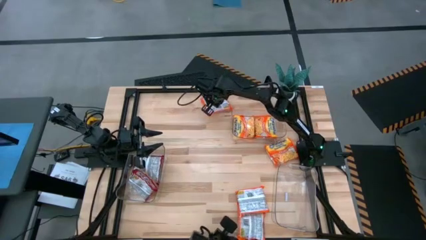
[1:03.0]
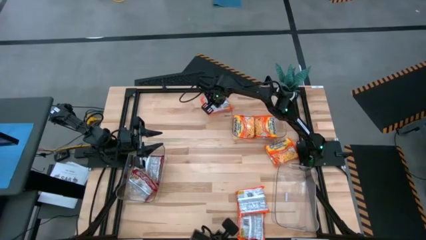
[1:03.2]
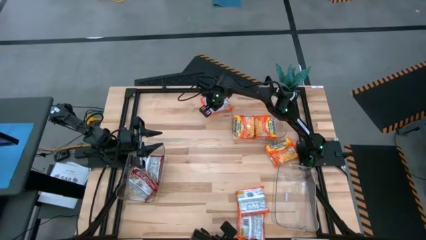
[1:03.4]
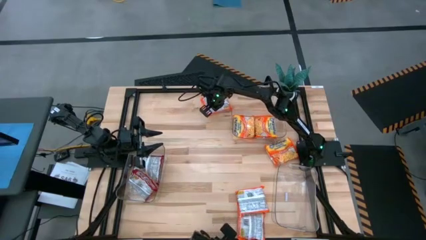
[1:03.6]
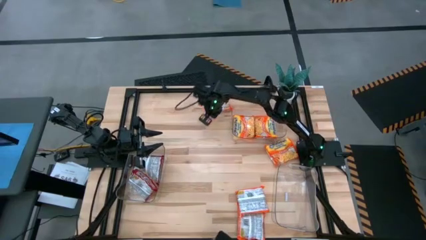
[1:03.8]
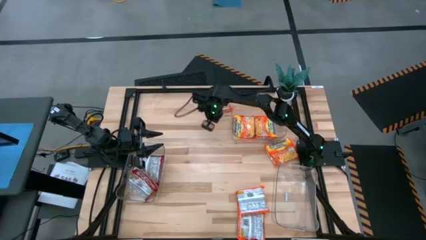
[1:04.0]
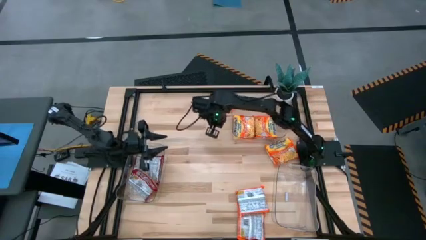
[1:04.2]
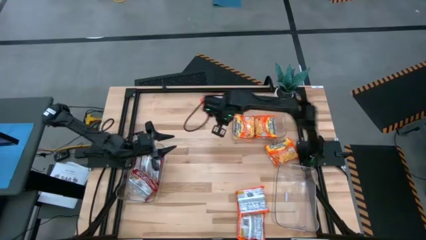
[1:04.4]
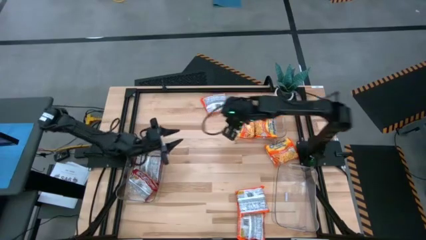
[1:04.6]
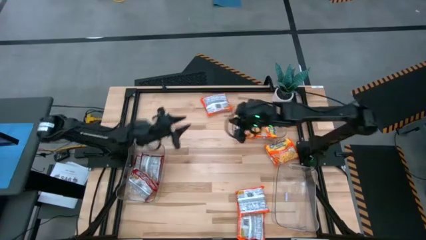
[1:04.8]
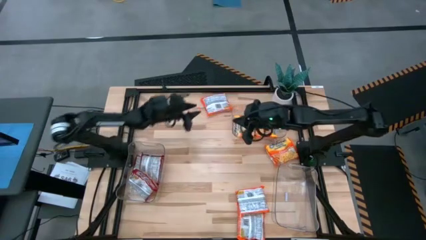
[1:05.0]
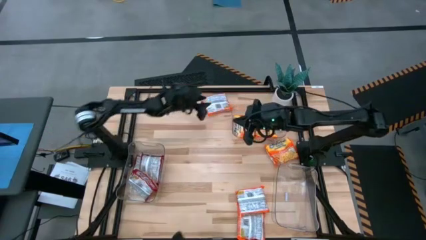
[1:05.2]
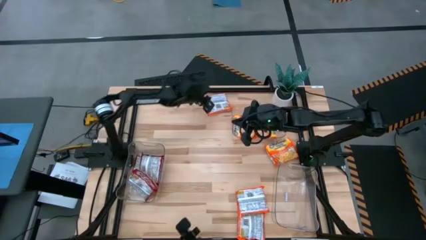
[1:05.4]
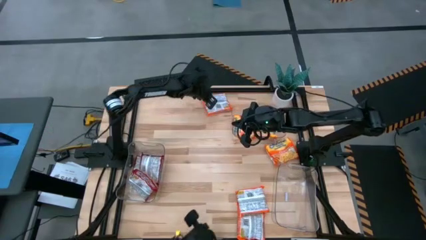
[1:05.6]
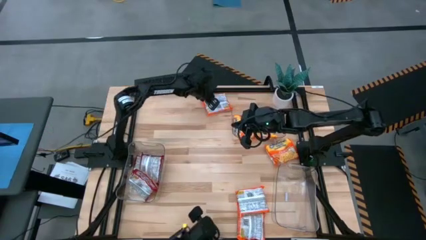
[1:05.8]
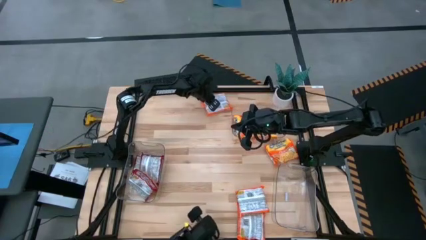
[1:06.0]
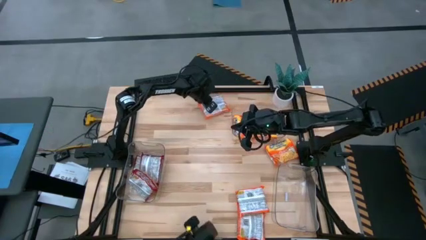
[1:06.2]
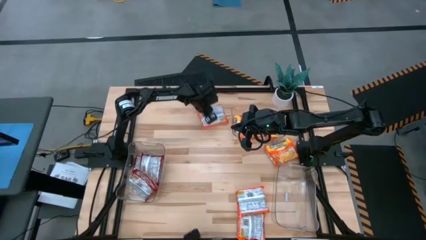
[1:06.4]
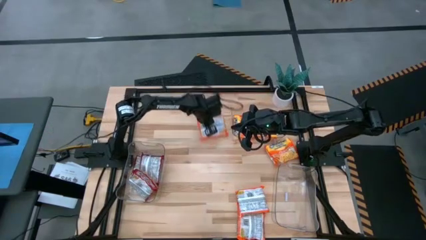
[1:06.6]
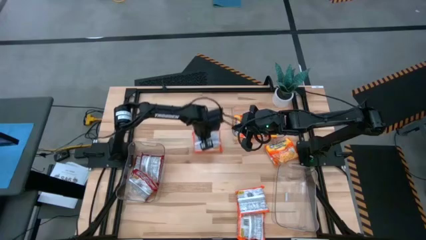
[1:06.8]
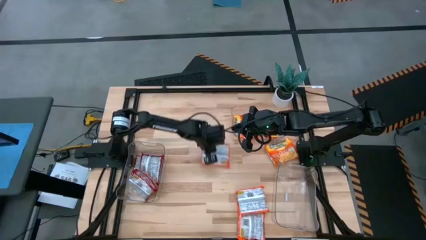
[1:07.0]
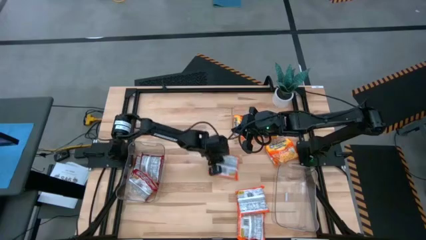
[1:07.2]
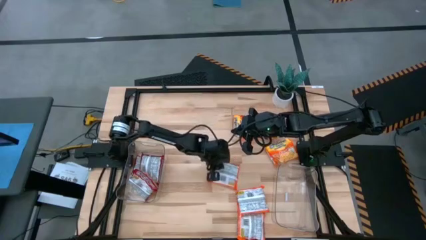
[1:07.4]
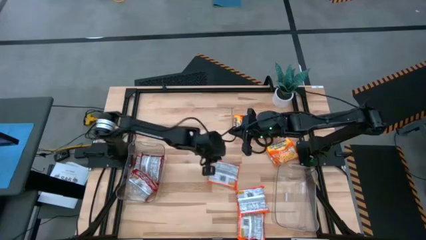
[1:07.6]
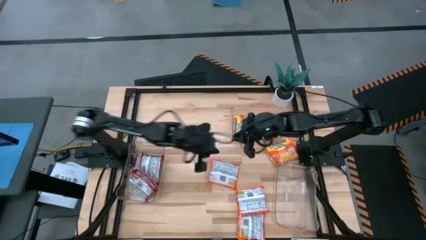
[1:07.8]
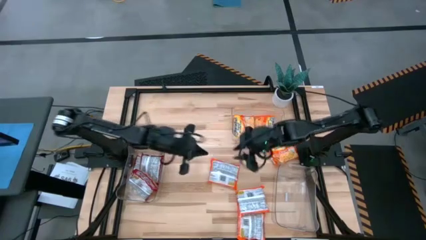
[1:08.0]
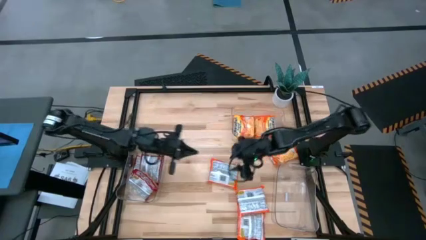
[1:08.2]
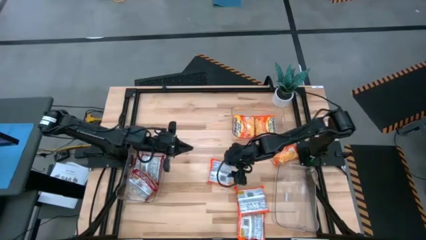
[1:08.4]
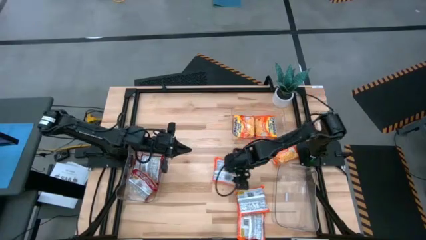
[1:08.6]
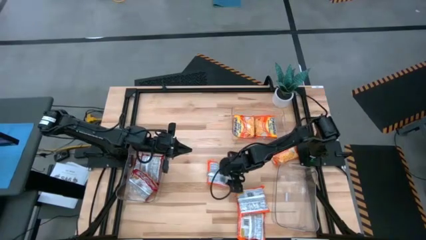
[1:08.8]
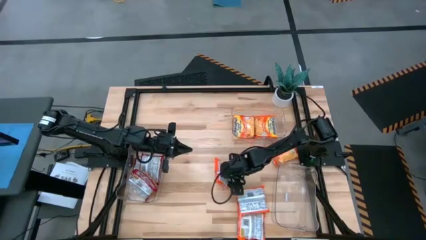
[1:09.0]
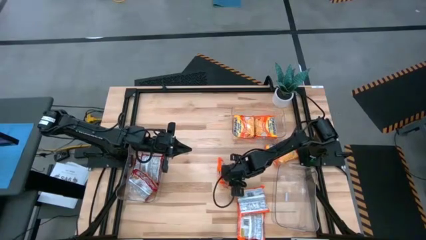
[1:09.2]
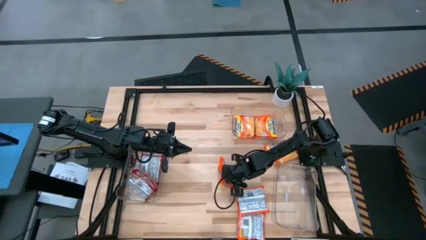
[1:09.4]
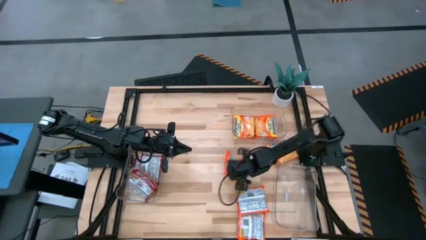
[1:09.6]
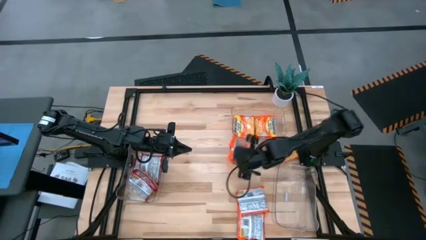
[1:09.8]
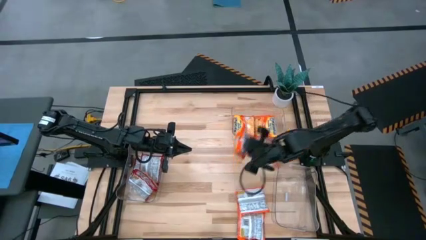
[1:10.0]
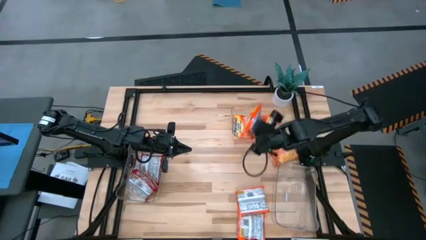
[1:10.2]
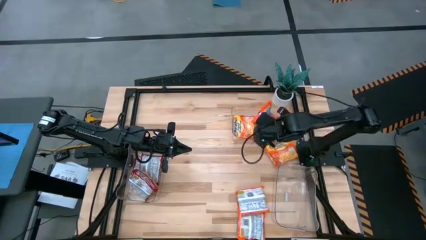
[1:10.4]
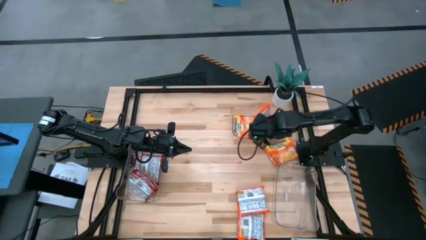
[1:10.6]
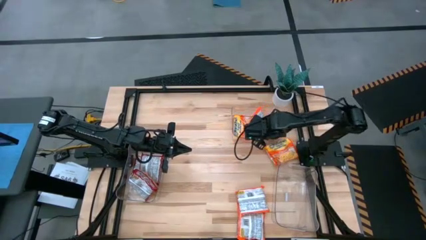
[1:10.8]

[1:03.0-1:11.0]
Task: Sort Maruchan noodles
Put the orange noodle pack into the top transparent bin

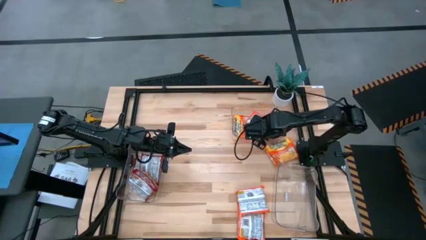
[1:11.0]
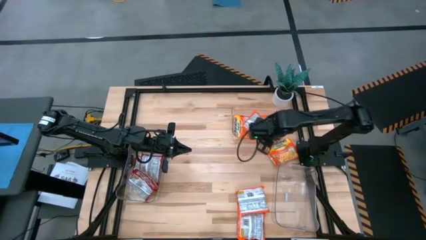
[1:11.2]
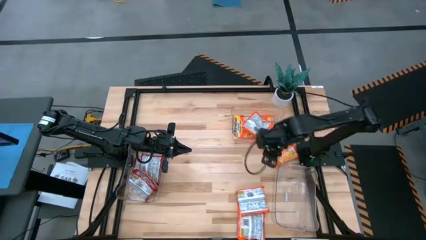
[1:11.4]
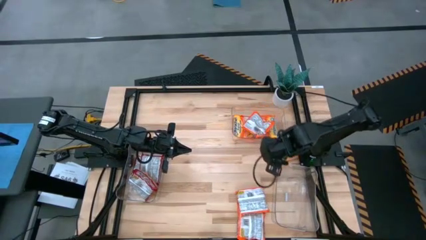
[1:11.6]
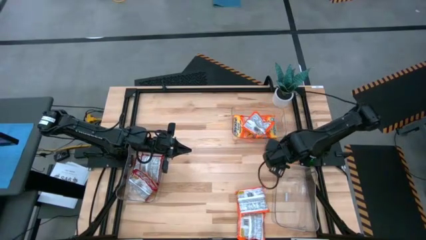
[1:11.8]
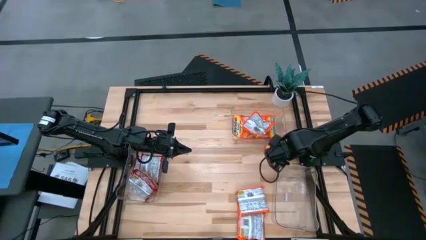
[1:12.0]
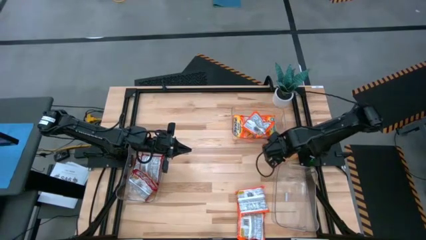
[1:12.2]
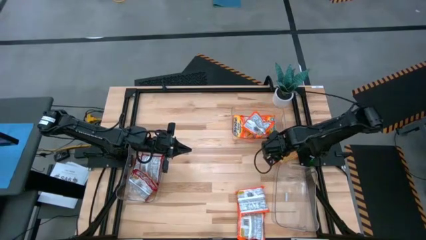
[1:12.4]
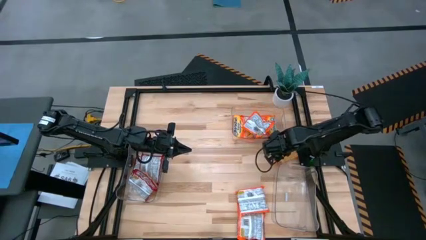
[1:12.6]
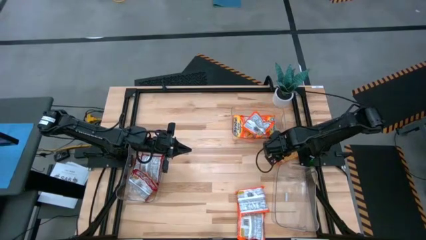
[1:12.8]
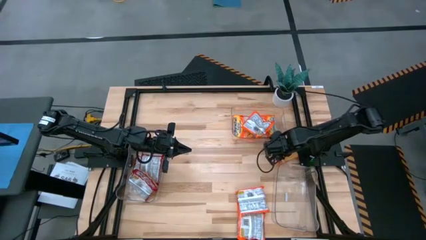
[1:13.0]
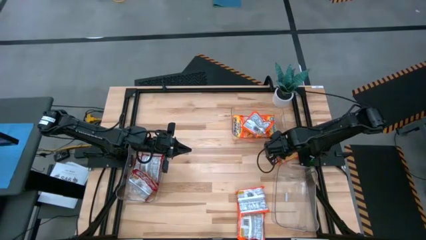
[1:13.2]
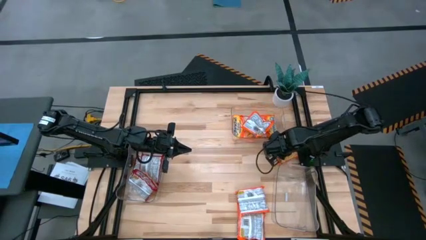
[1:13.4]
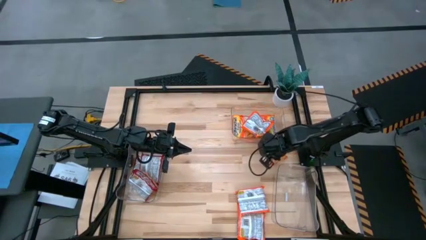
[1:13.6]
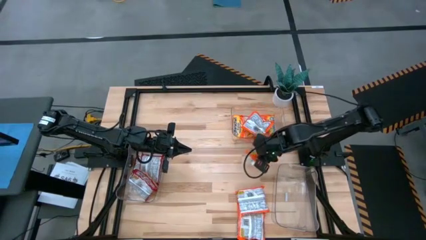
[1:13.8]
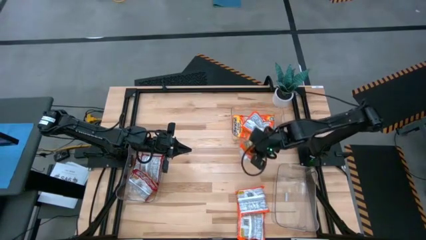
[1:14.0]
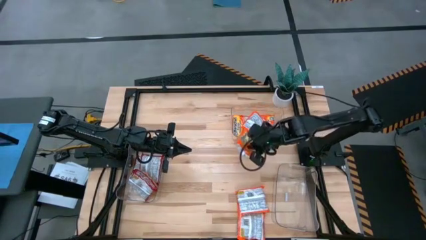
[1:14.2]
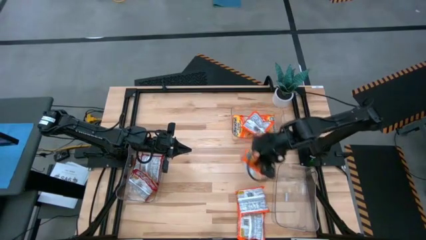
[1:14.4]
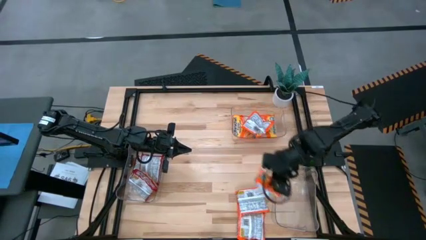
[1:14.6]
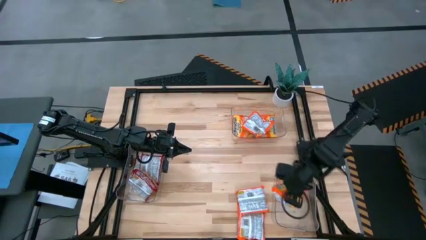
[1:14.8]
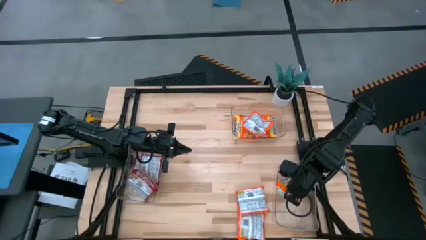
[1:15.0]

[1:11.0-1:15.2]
Put the orange noodle pack into the bottom right transparent bin

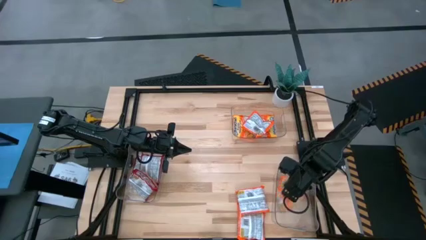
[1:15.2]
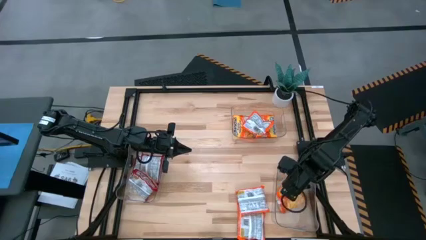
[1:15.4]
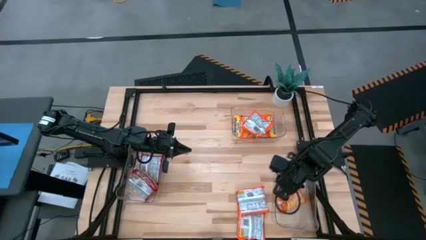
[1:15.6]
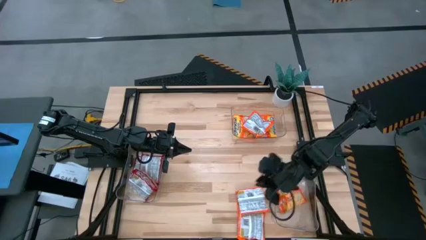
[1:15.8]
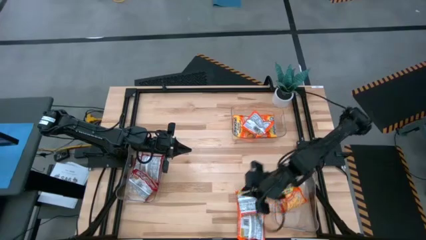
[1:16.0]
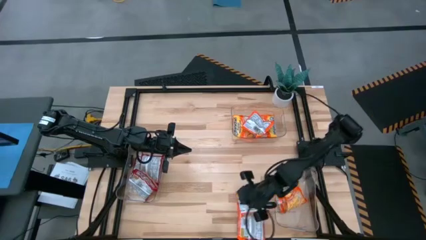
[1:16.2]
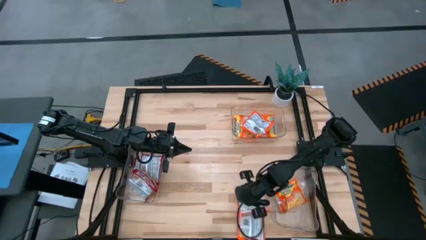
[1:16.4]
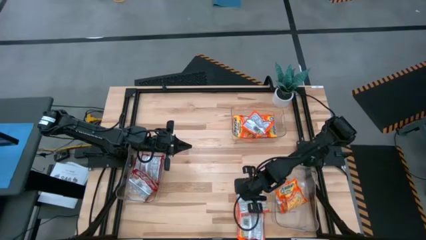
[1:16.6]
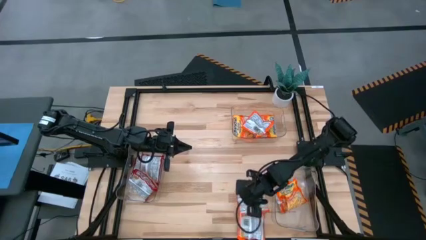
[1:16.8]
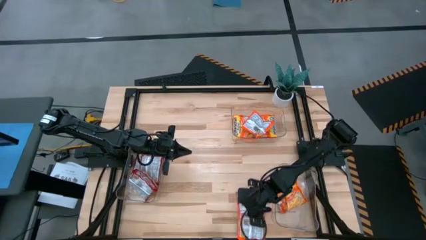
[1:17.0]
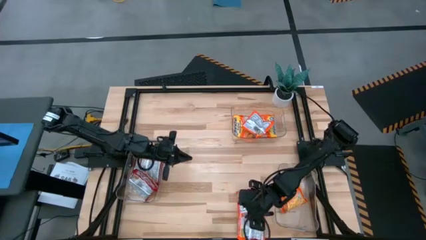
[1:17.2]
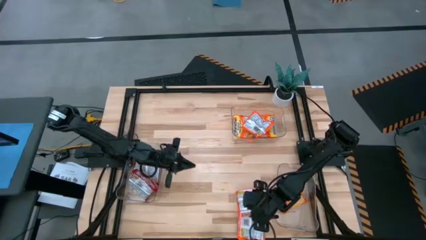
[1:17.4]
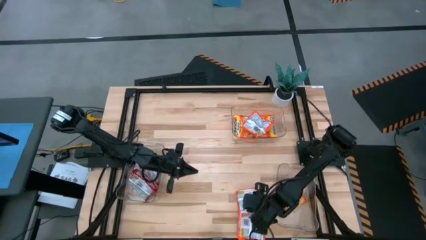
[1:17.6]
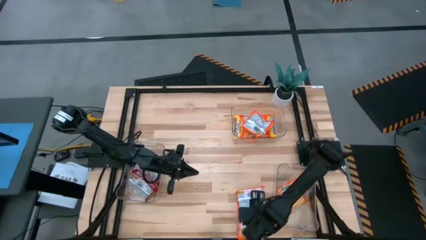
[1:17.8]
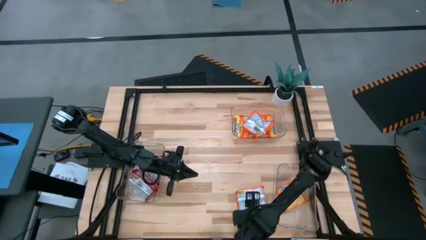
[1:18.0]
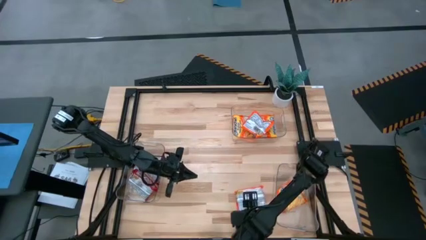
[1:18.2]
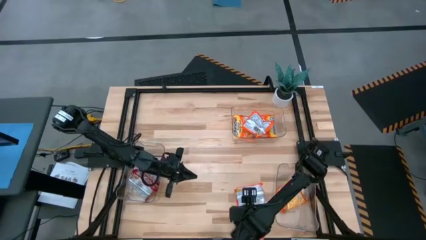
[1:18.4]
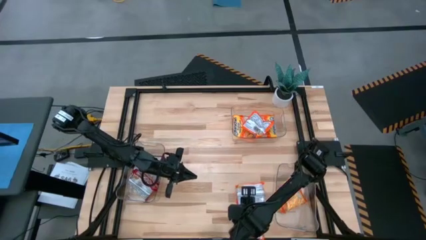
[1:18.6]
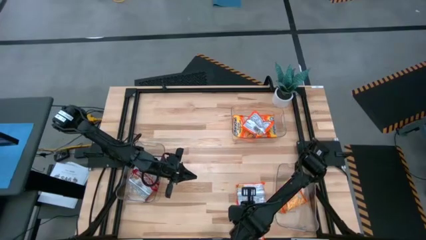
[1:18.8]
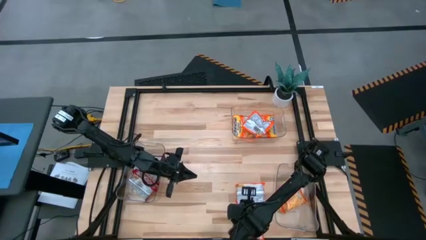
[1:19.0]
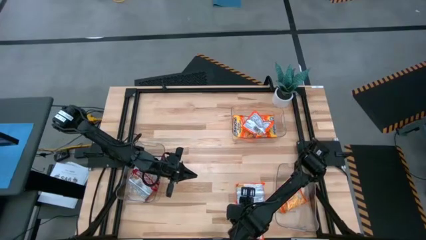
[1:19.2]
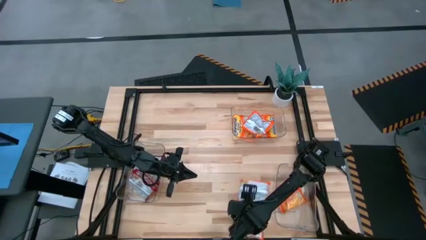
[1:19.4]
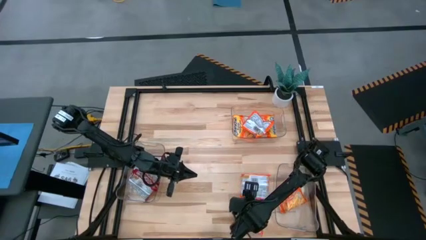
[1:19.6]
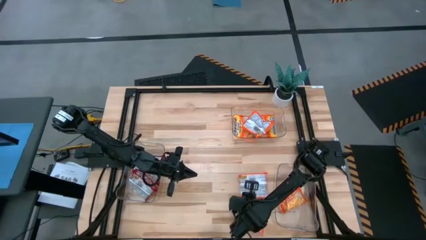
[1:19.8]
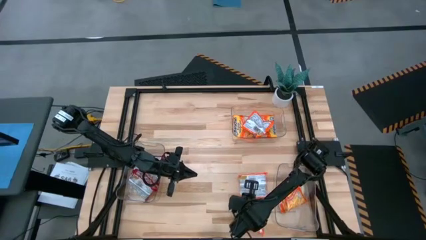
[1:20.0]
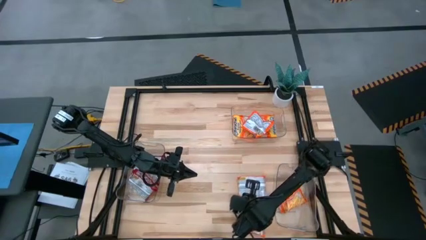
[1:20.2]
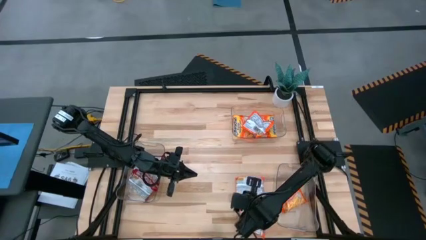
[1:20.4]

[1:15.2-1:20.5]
Put the orange noodle pack into the bottom right transparent bin
